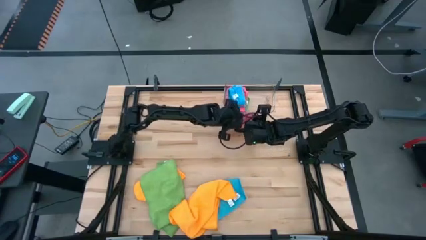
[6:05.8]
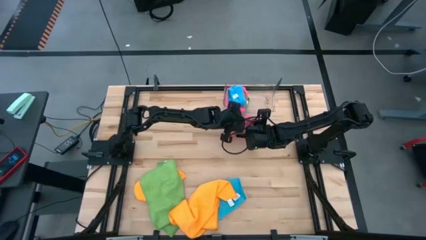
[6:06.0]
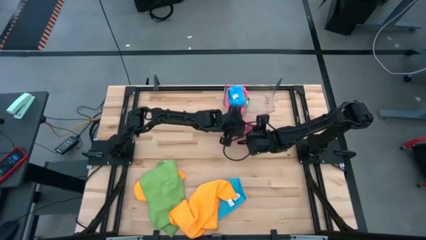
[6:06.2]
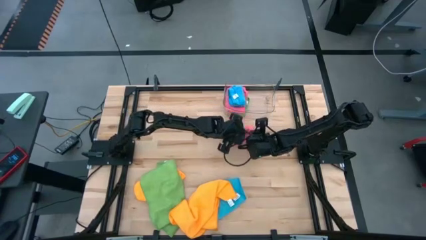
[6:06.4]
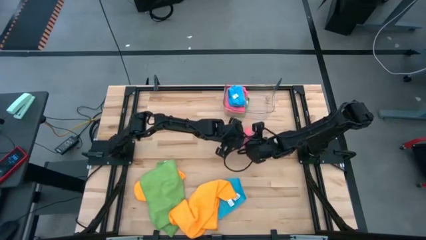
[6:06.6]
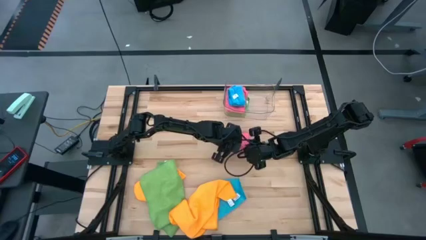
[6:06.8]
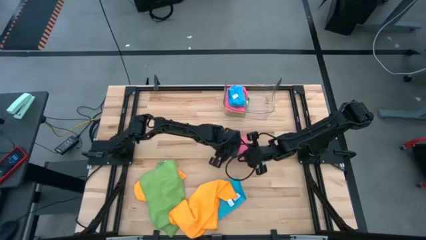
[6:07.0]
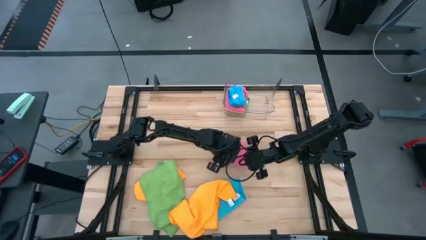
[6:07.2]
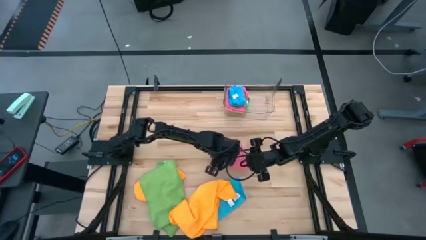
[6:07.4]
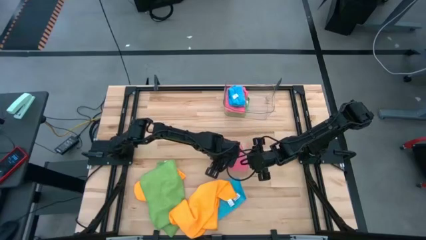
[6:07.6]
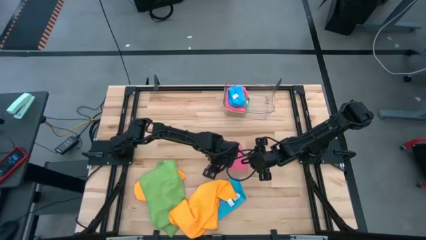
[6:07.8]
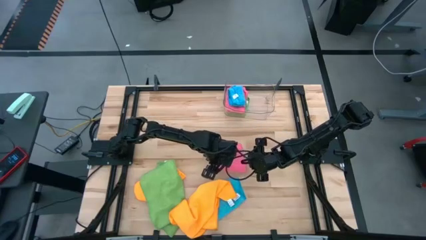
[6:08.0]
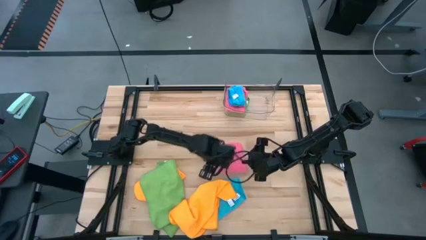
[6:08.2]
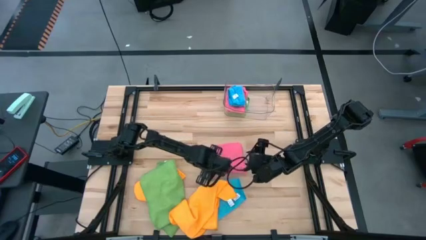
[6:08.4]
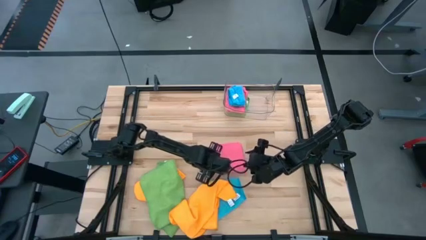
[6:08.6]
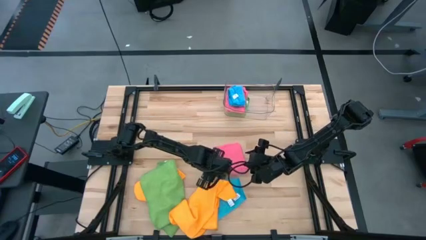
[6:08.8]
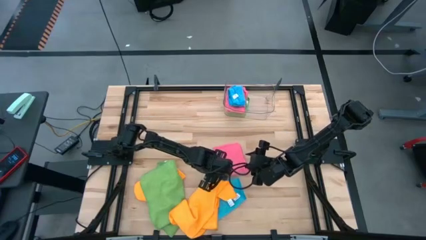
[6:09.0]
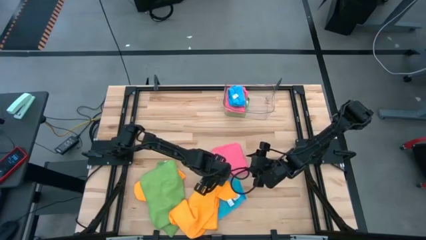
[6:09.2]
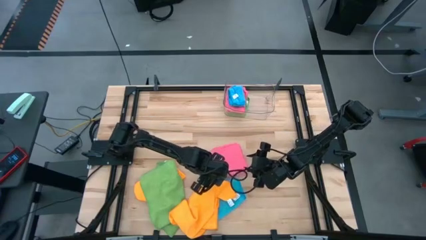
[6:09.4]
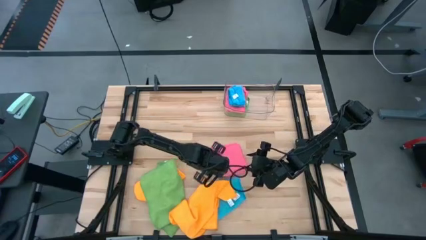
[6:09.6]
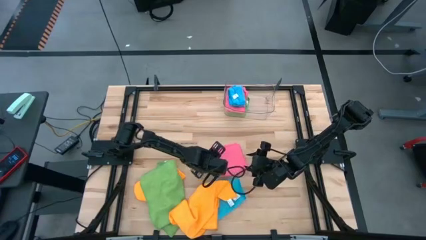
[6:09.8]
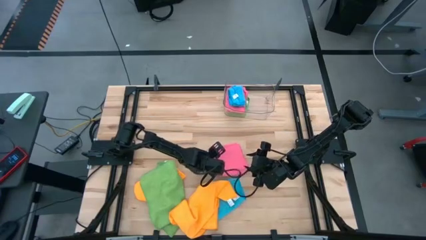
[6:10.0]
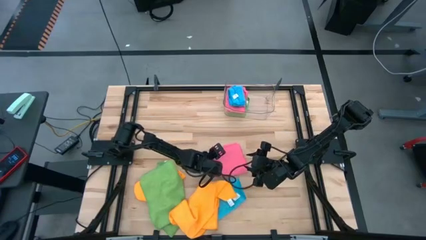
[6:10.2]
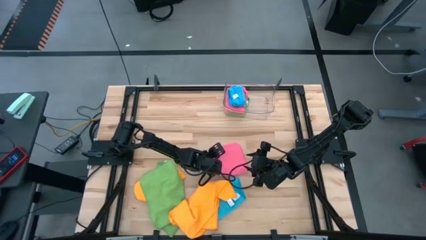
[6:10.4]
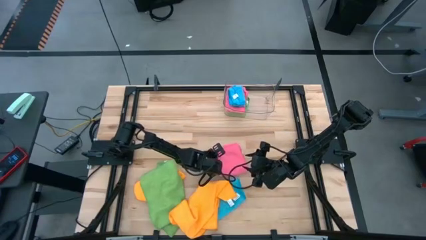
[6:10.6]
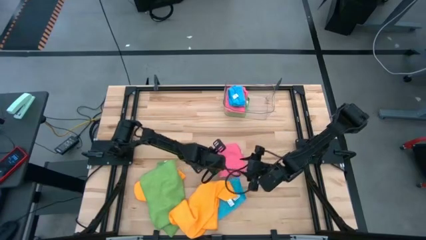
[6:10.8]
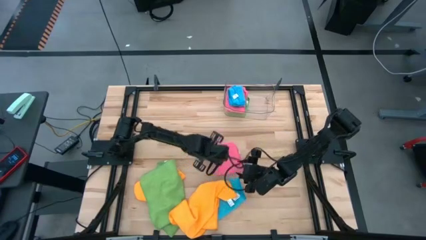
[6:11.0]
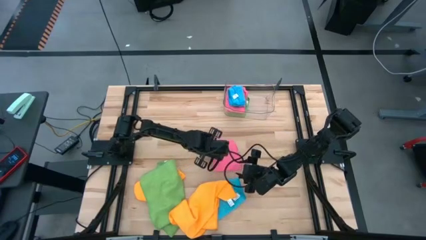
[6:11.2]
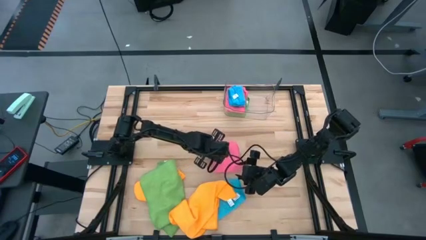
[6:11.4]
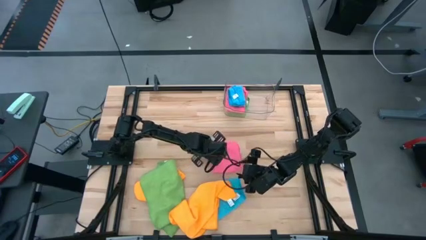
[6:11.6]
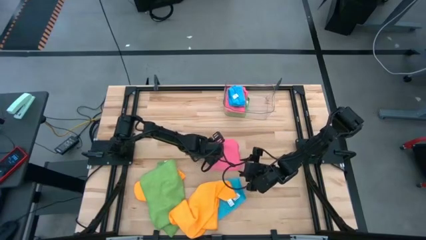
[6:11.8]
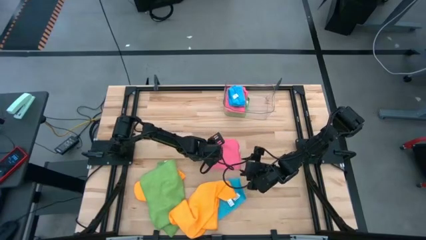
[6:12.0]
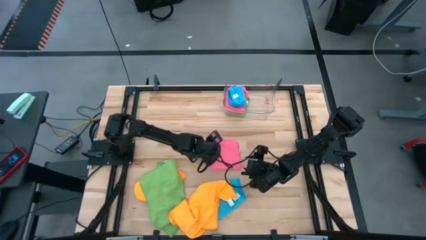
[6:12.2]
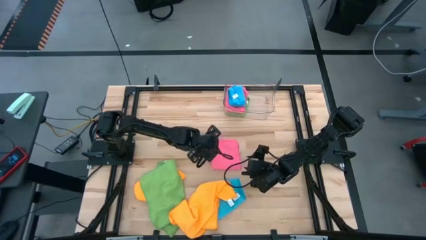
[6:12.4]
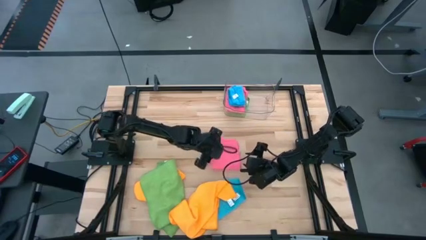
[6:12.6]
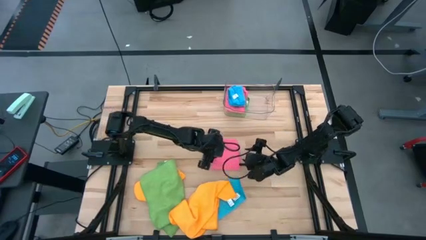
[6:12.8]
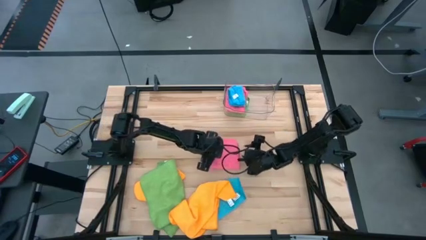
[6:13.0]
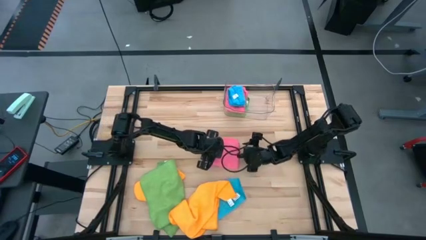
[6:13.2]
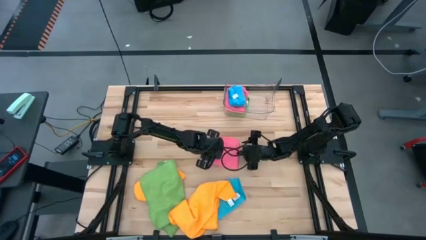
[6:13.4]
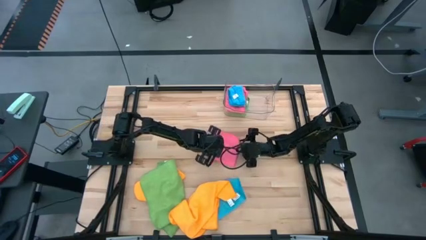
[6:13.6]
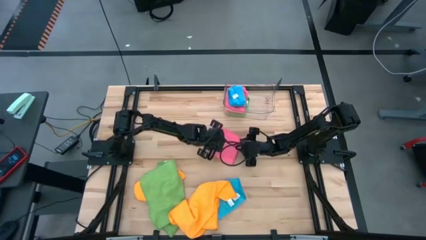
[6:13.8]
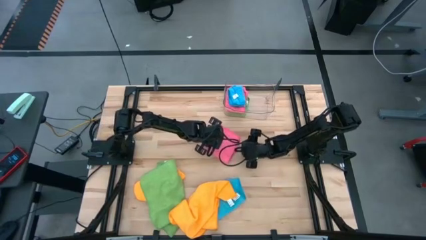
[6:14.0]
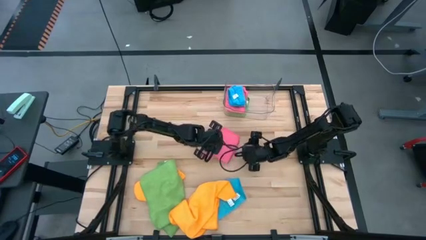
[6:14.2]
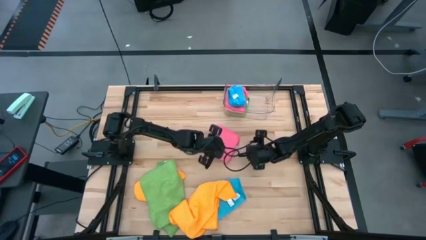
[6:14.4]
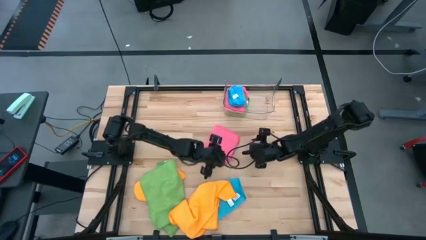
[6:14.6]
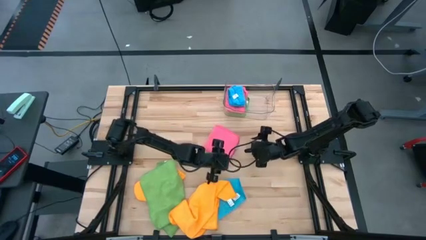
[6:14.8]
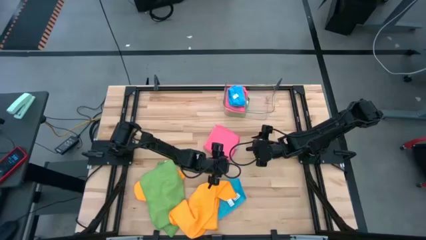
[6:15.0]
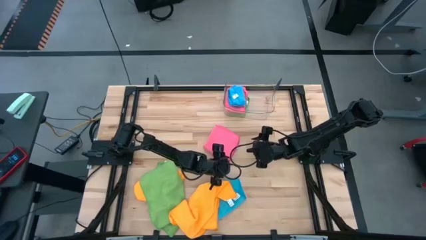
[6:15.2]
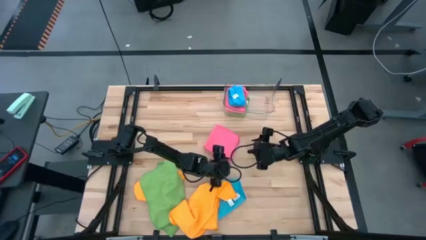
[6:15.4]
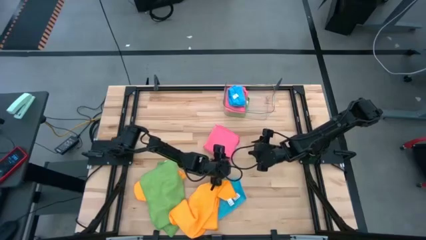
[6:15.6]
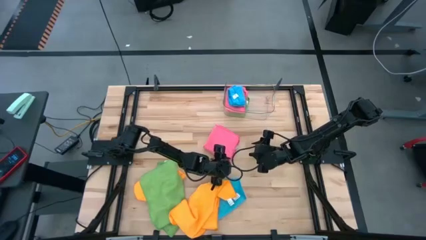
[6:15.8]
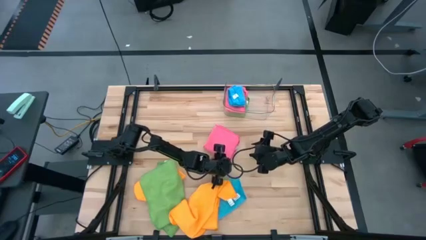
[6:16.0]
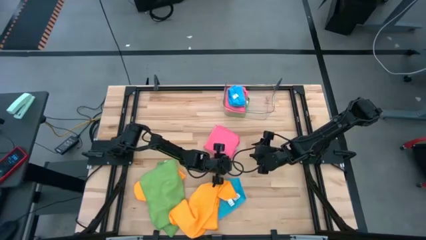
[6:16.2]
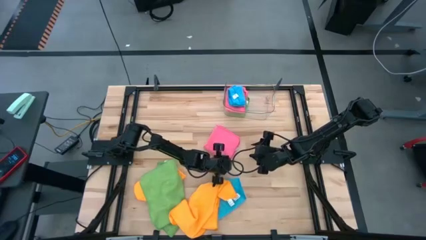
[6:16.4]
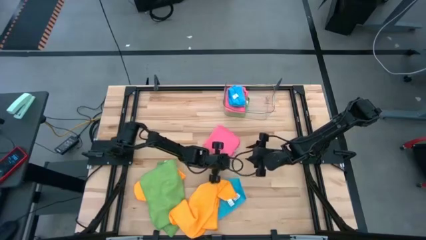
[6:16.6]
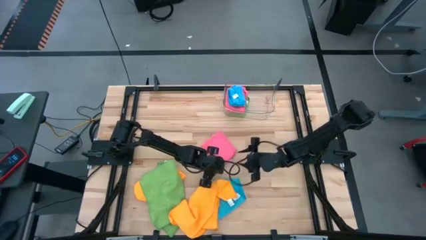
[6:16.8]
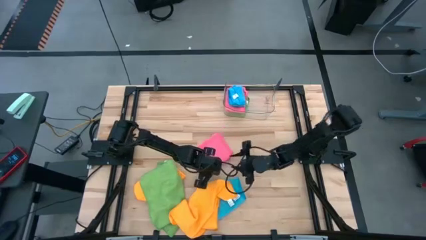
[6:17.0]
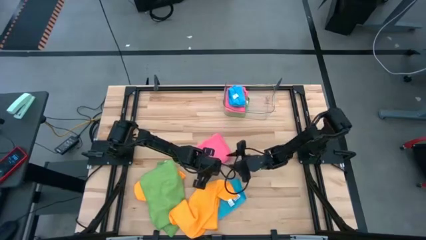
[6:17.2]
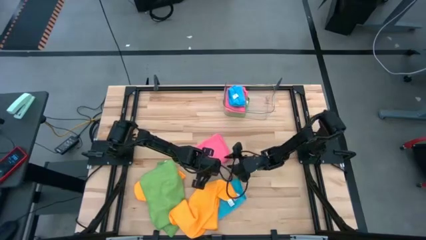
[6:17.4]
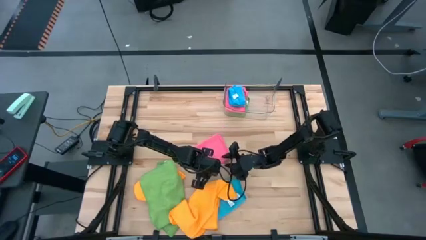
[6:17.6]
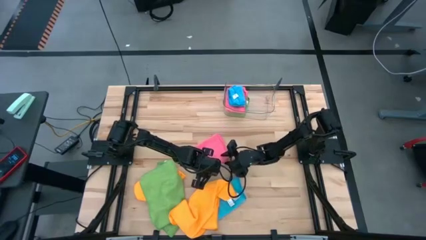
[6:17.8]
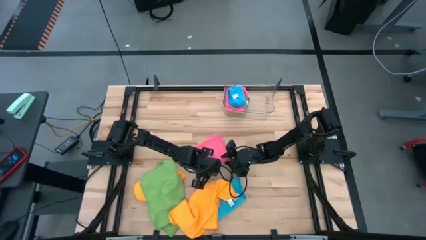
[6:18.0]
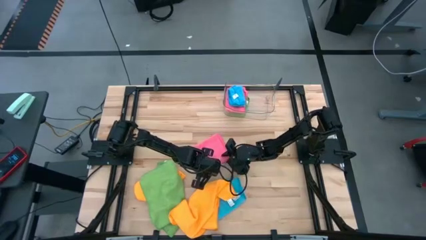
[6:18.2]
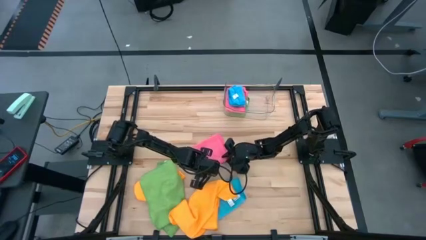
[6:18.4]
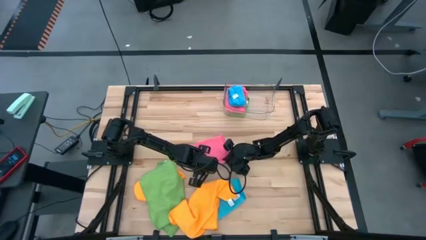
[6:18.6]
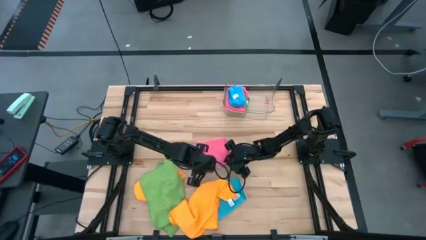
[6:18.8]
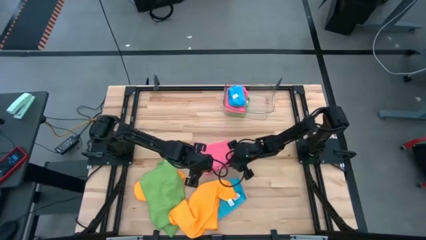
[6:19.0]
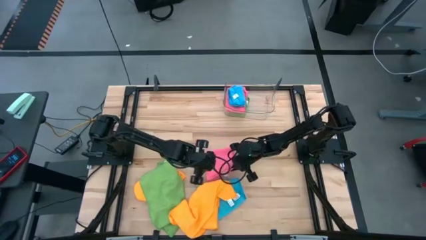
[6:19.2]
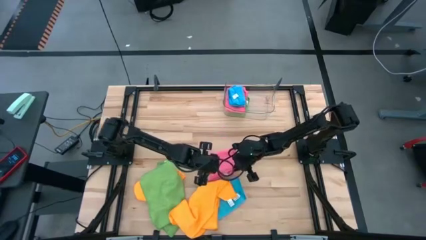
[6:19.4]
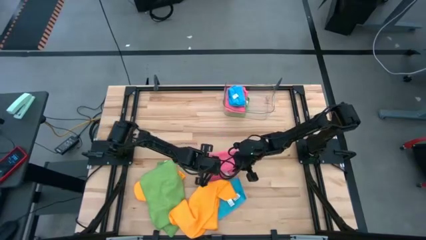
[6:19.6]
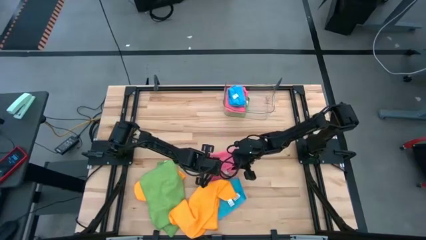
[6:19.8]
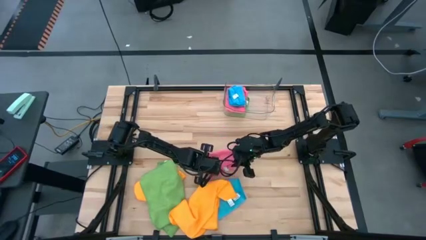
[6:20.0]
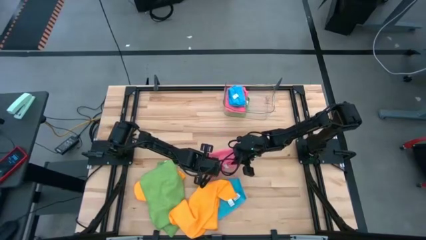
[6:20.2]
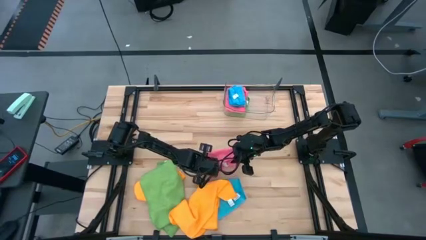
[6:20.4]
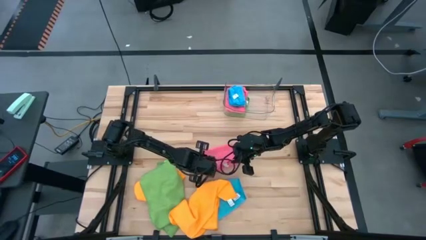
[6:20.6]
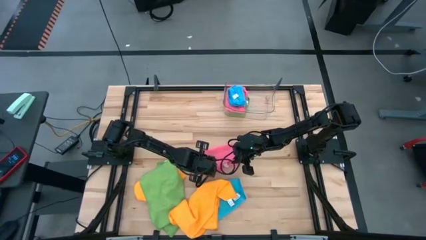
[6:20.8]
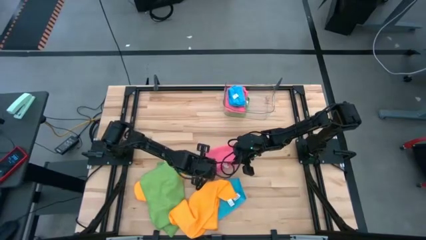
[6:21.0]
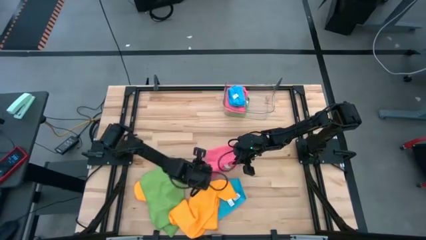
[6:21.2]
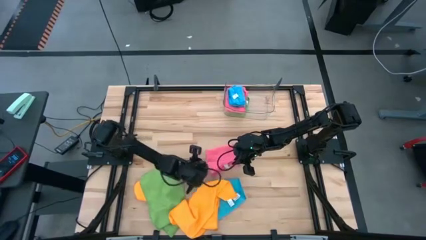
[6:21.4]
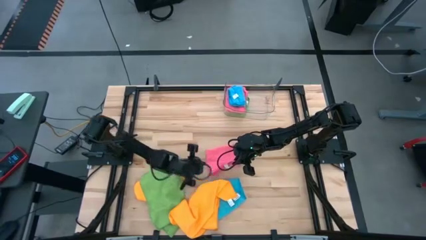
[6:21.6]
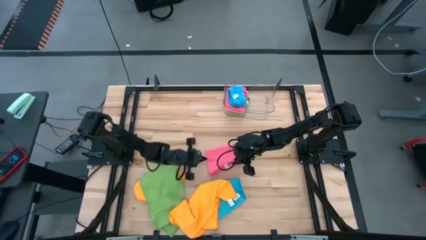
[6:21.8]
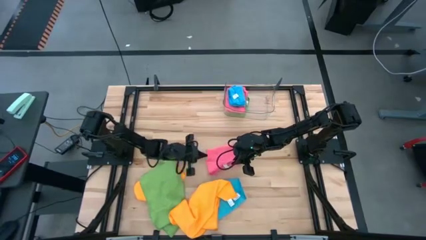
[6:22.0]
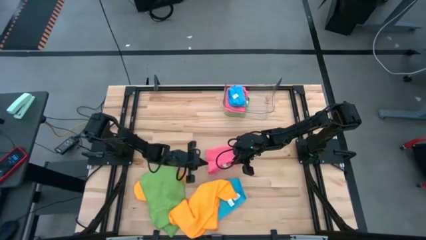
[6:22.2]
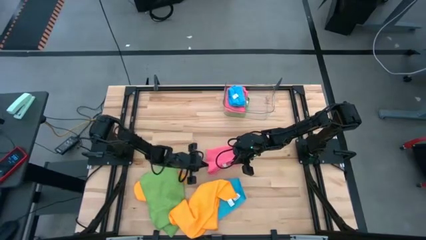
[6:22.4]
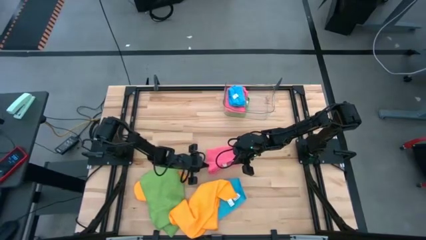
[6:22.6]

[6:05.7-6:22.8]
Task: Fold microfiber towels
Fold the pink towel
